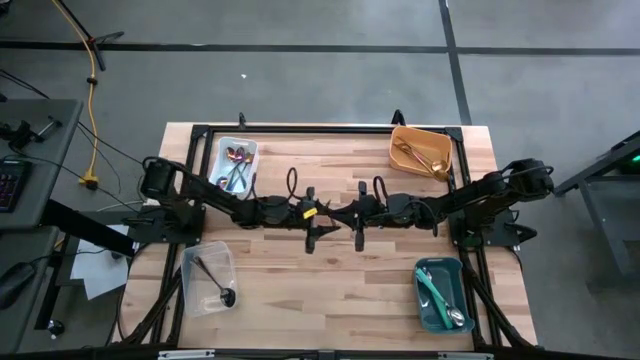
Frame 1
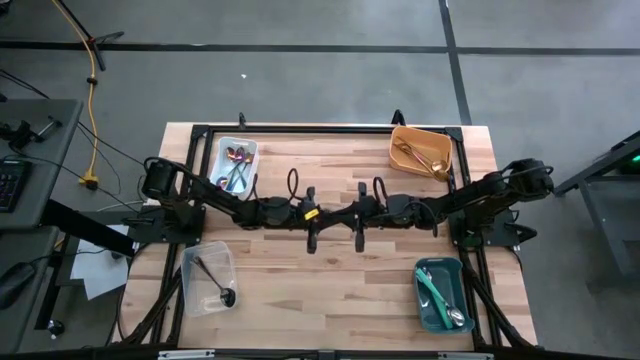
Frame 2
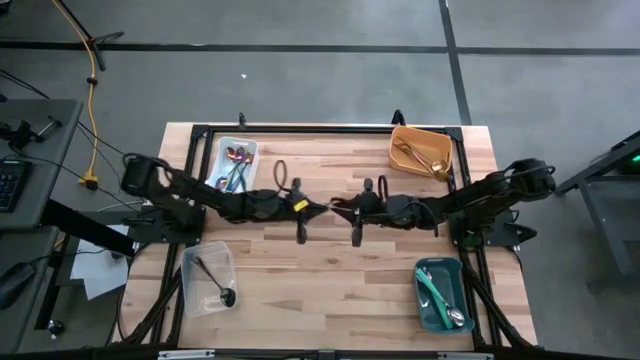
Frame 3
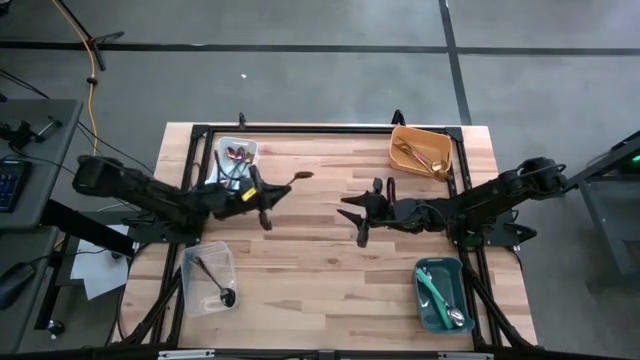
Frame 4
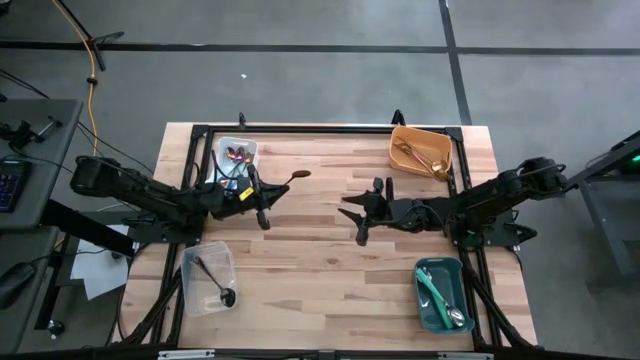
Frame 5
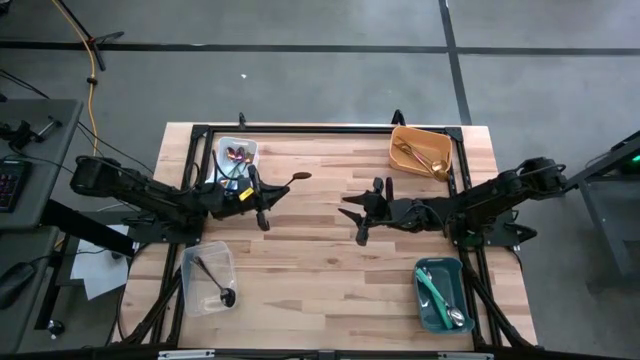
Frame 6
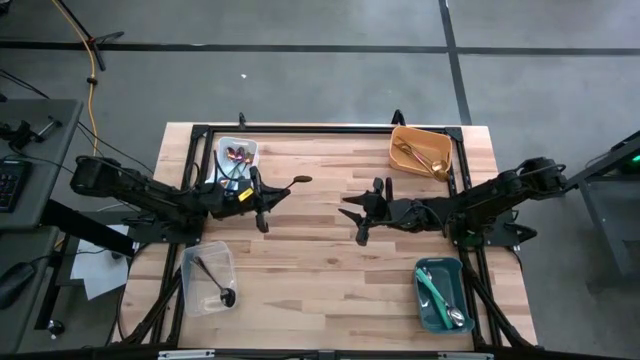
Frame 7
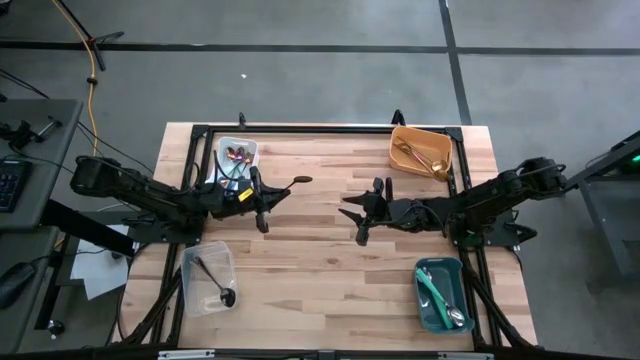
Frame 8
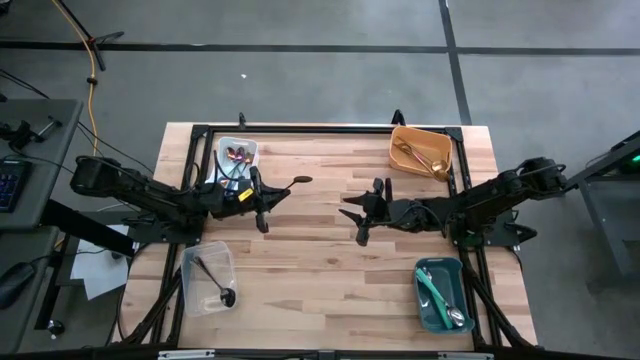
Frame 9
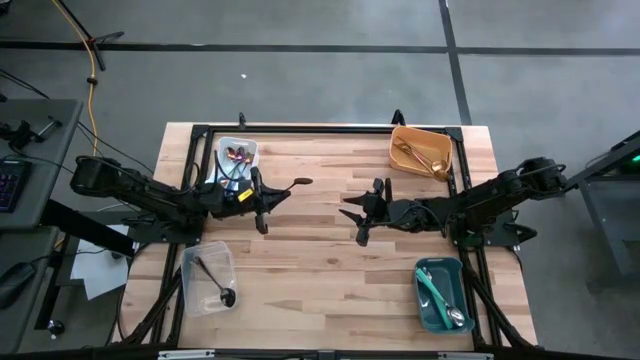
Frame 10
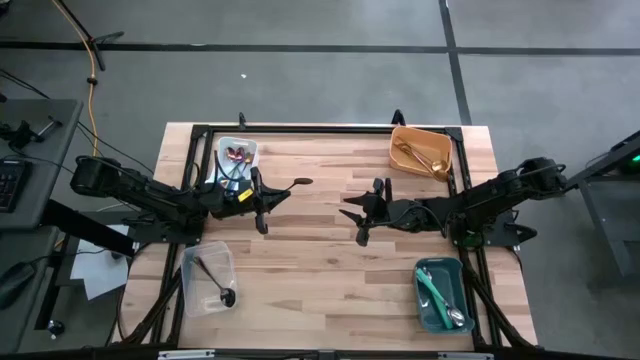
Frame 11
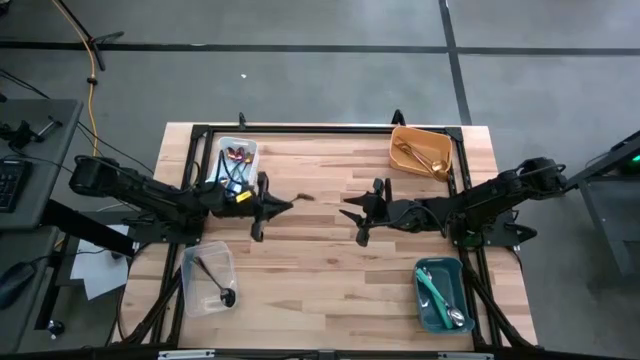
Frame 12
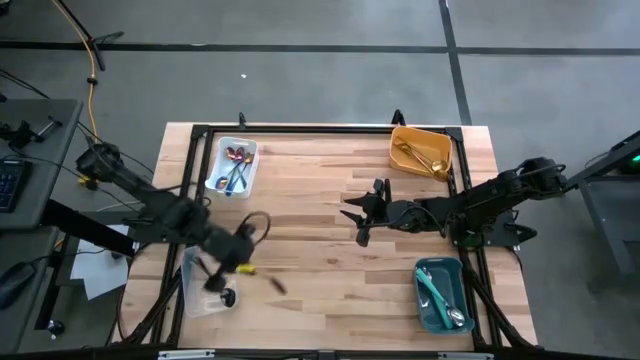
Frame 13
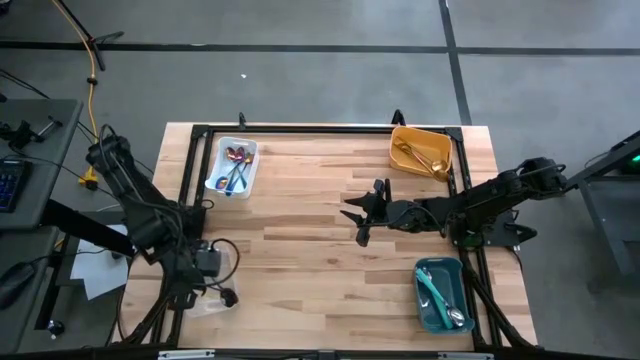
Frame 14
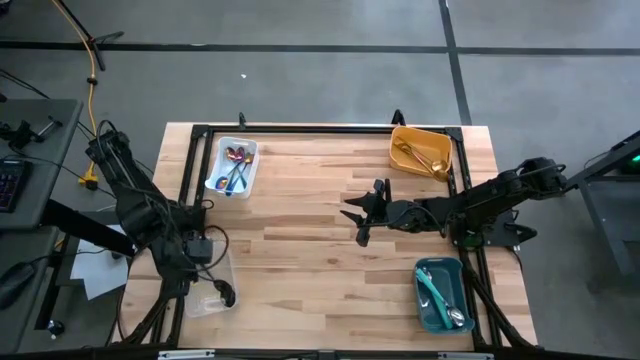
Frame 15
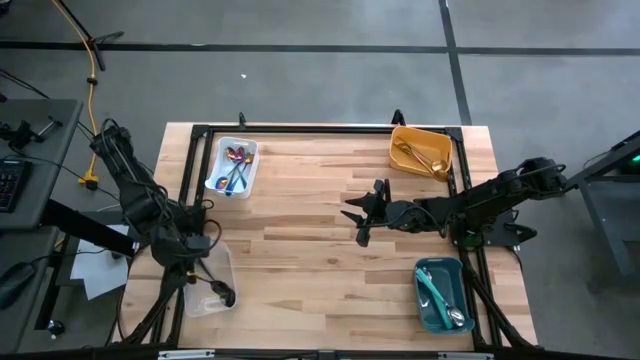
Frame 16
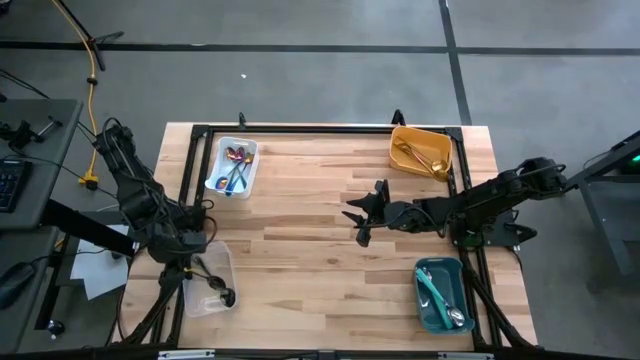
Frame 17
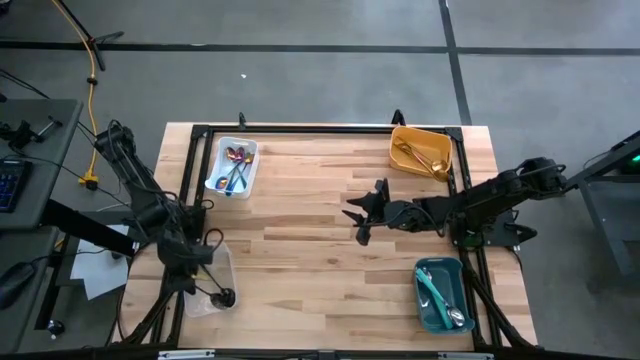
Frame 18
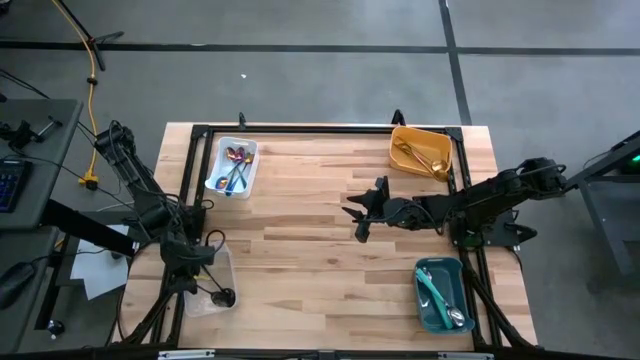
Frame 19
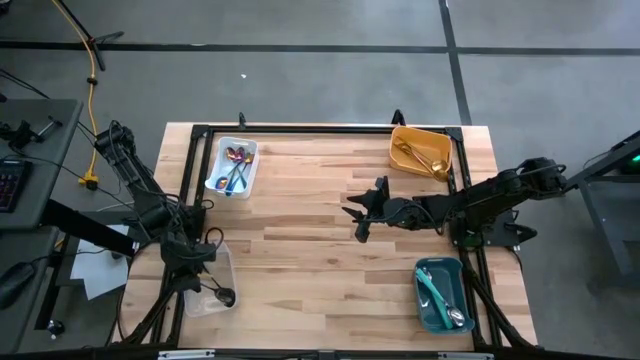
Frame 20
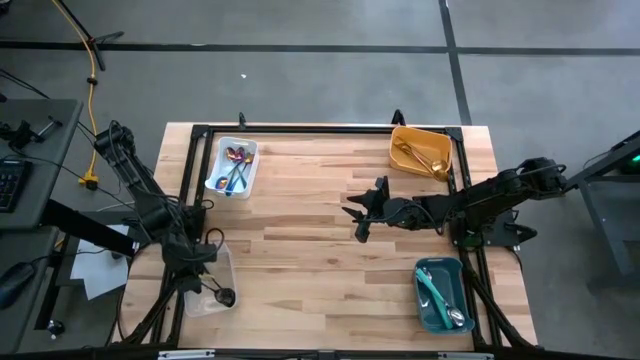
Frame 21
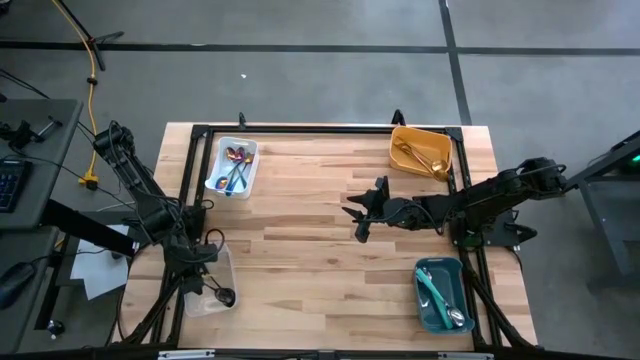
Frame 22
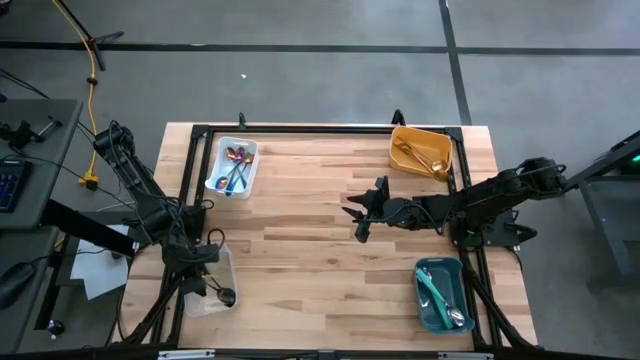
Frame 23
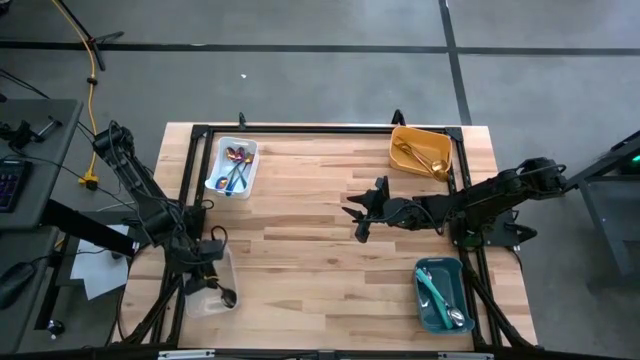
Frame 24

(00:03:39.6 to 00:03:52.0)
Task: Sort silverware by color (type)
Put the black spoon into the transparent bin

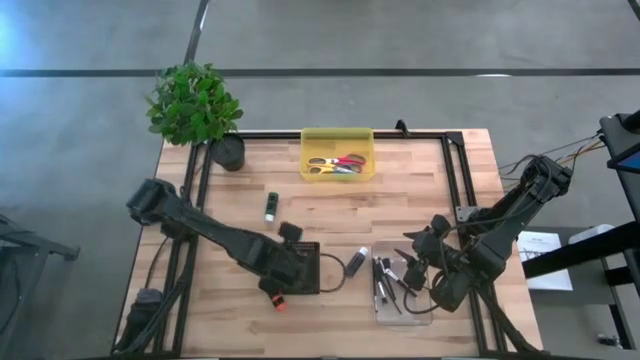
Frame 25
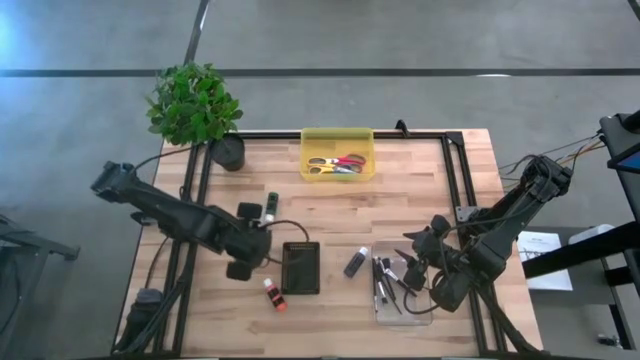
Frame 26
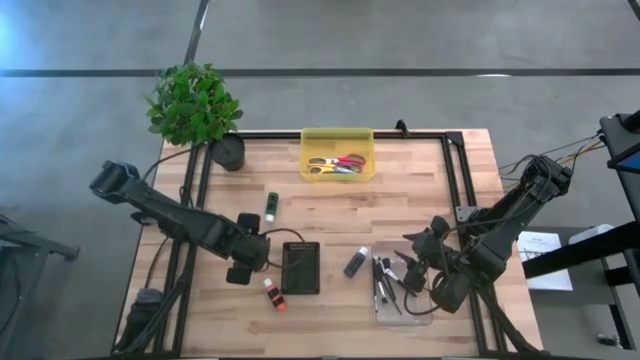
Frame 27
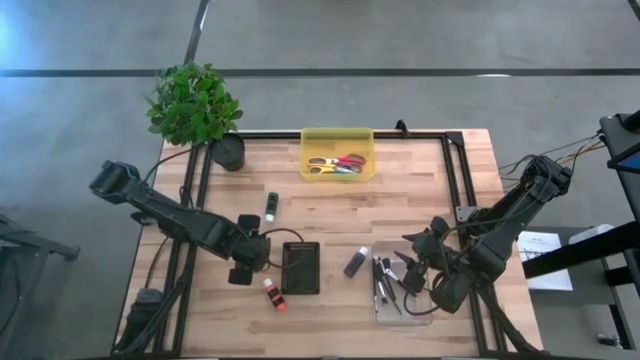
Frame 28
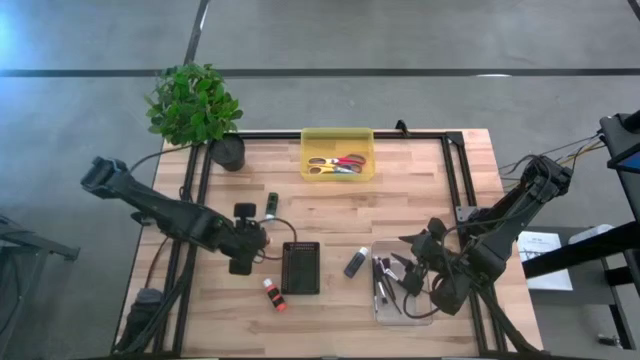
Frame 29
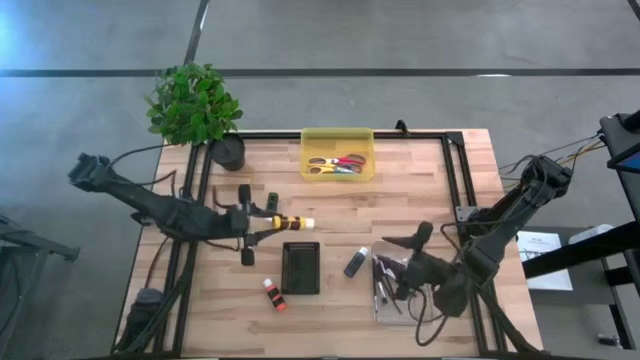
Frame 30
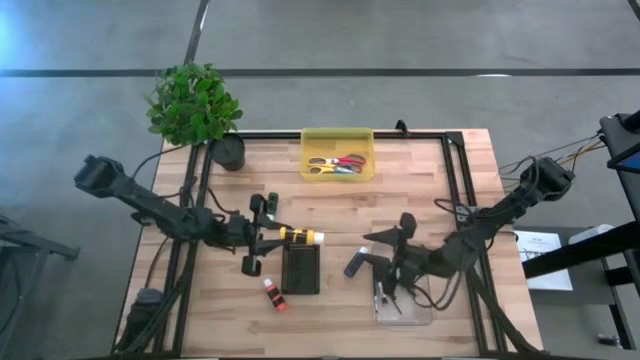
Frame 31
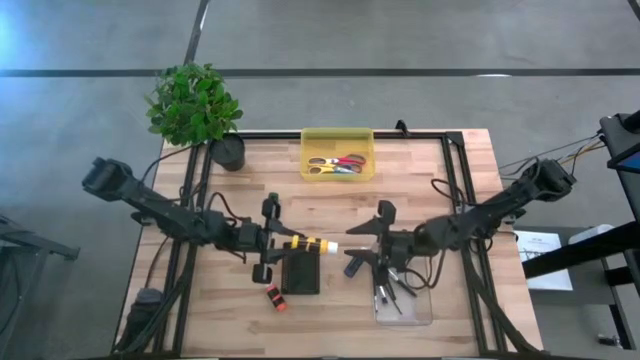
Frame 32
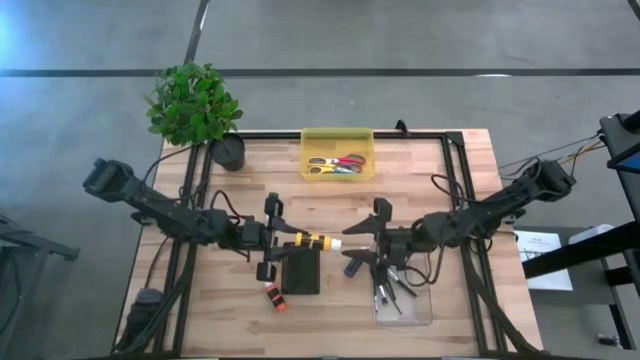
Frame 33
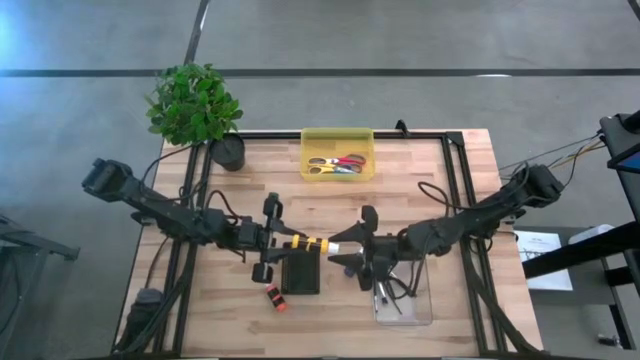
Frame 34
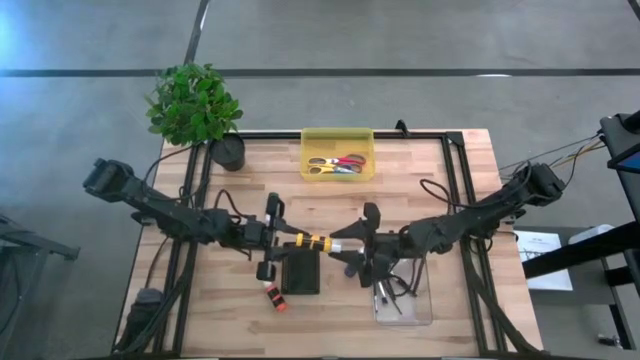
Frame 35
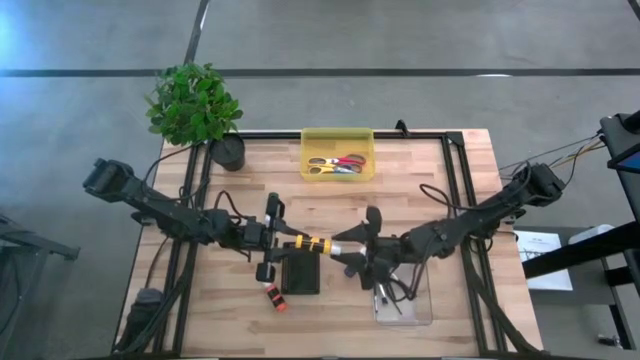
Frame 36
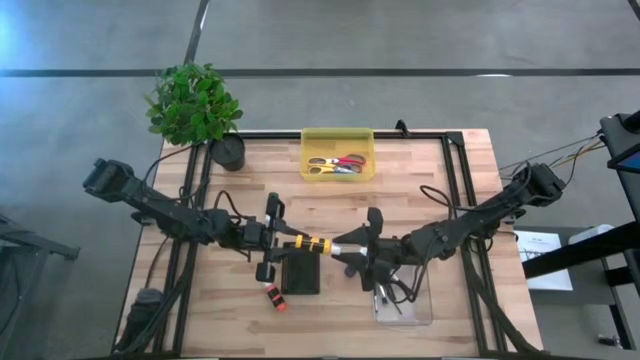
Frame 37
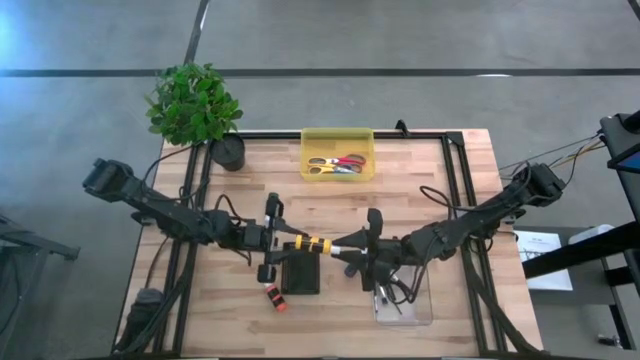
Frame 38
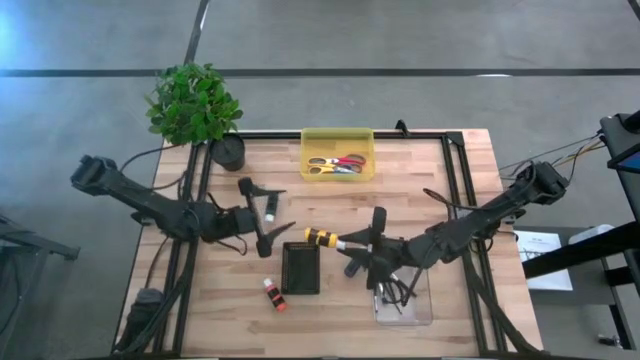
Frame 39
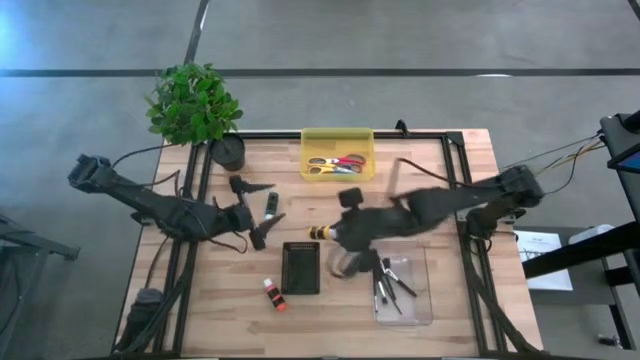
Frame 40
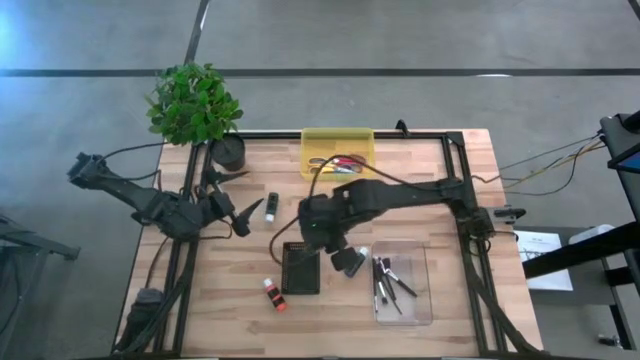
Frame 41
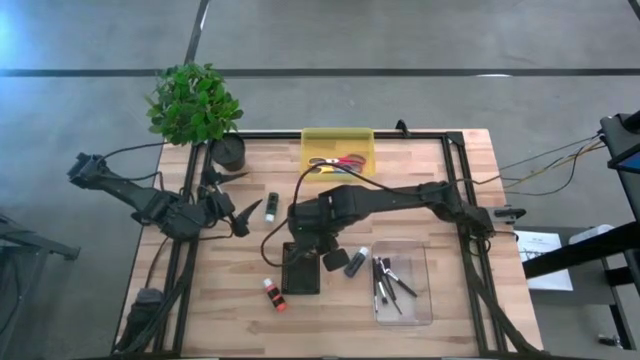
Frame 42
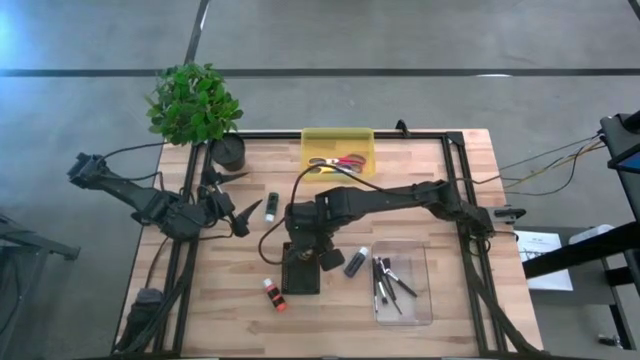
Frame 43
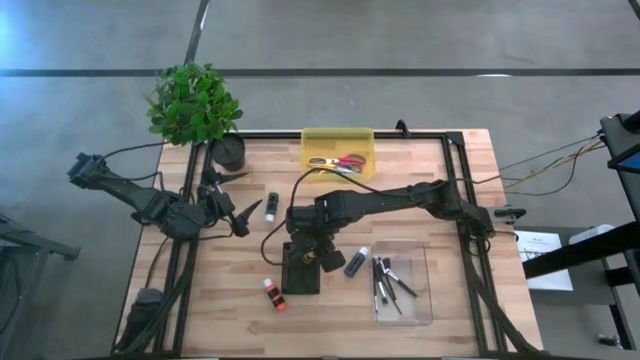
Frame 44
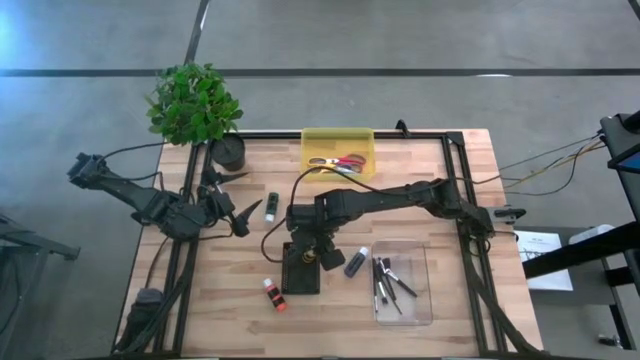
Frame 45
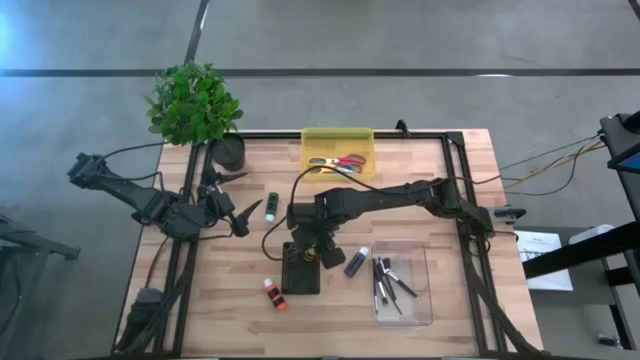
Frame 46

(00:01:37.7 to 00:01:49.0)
Task: Pick & Place Paint Supplies
Put the yellow paint bottle into the black bin
